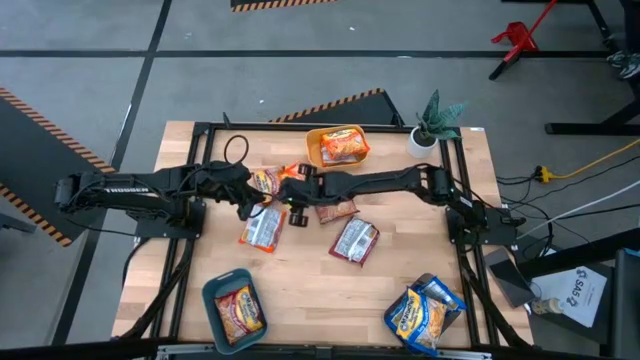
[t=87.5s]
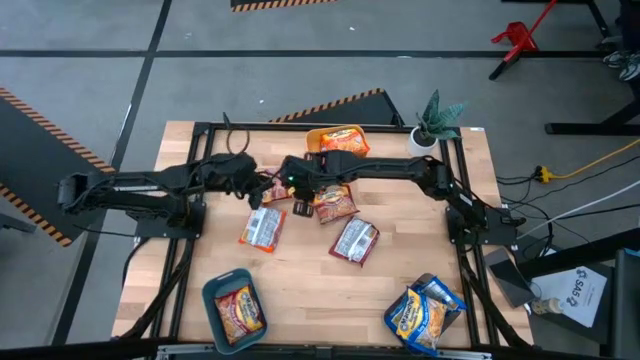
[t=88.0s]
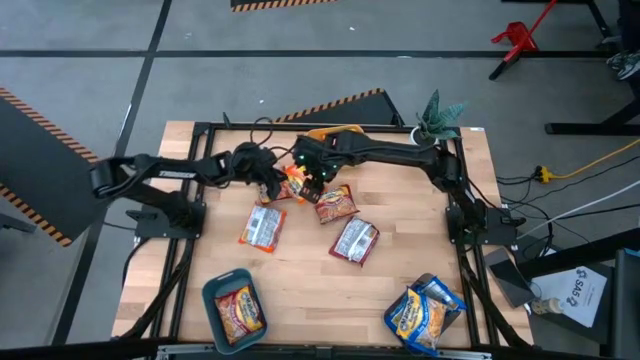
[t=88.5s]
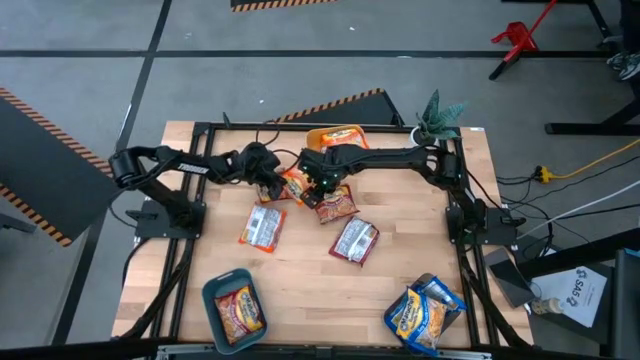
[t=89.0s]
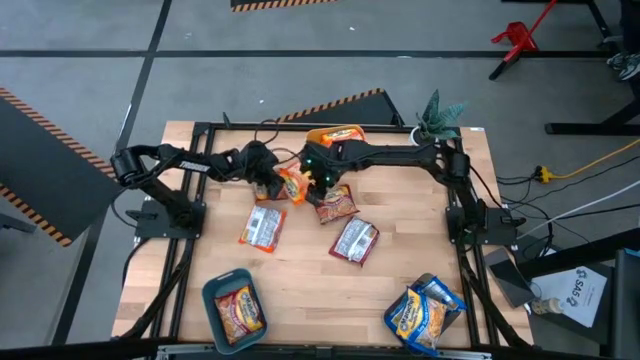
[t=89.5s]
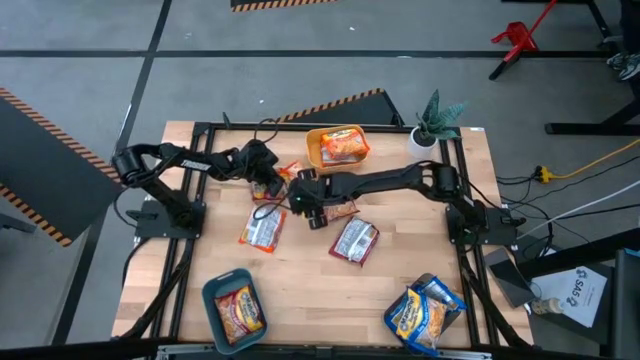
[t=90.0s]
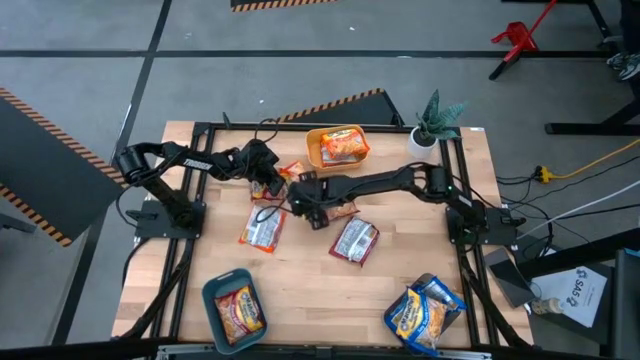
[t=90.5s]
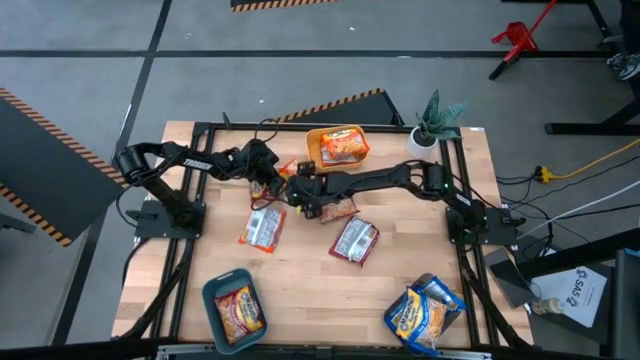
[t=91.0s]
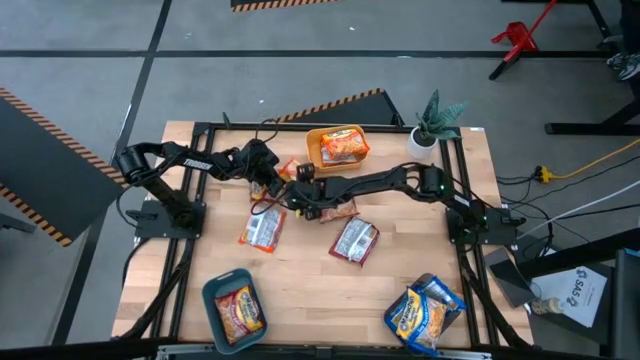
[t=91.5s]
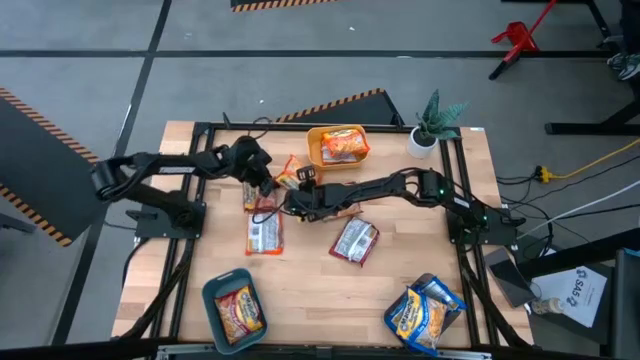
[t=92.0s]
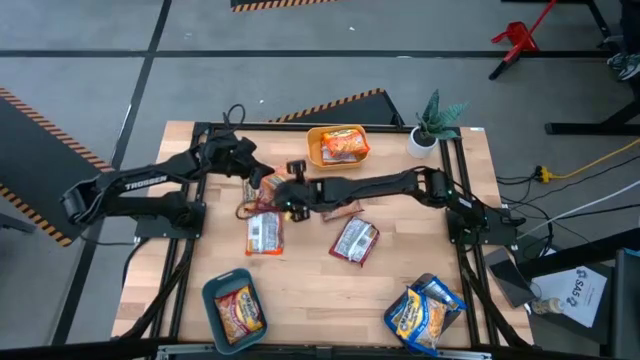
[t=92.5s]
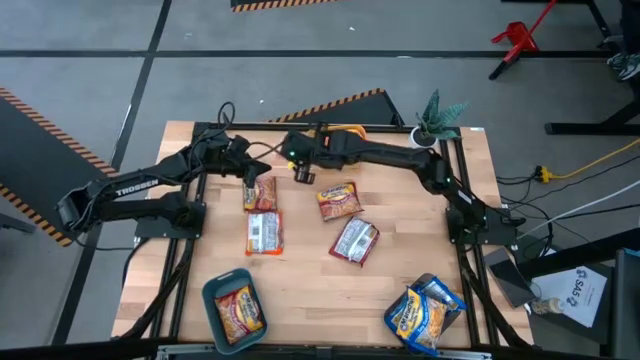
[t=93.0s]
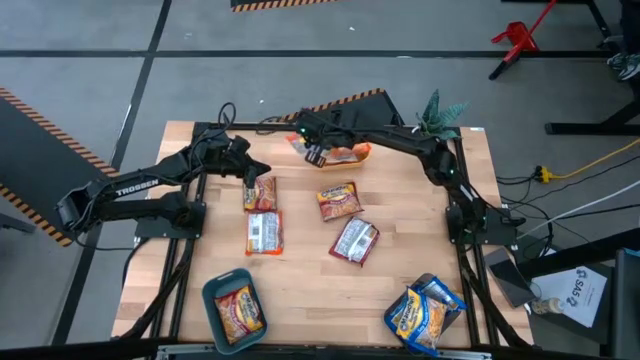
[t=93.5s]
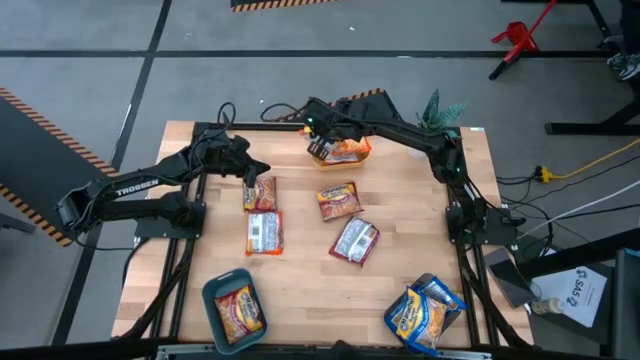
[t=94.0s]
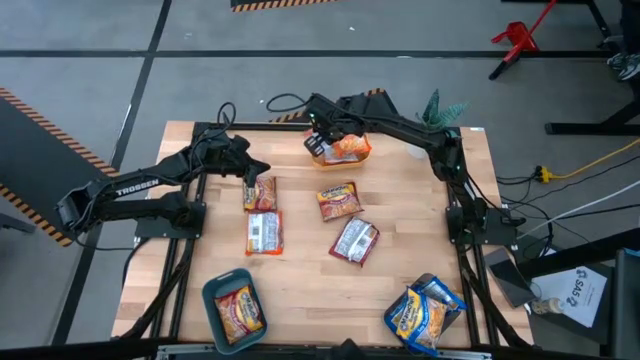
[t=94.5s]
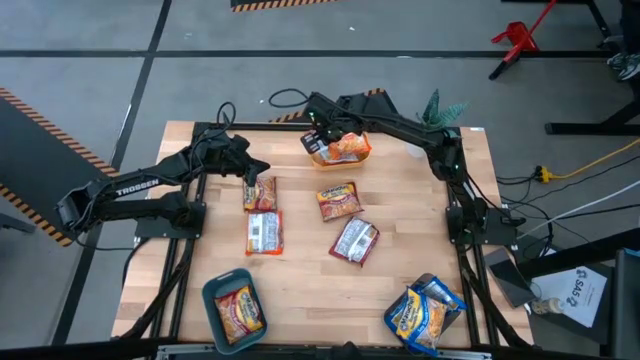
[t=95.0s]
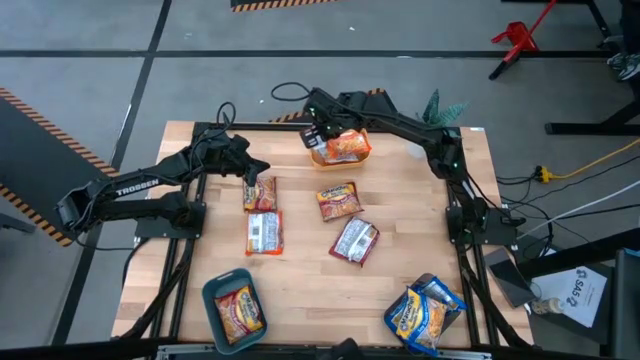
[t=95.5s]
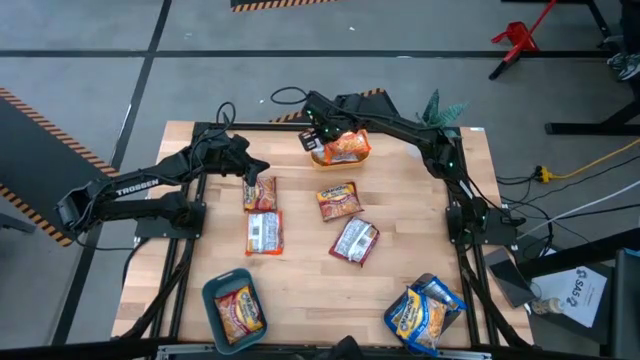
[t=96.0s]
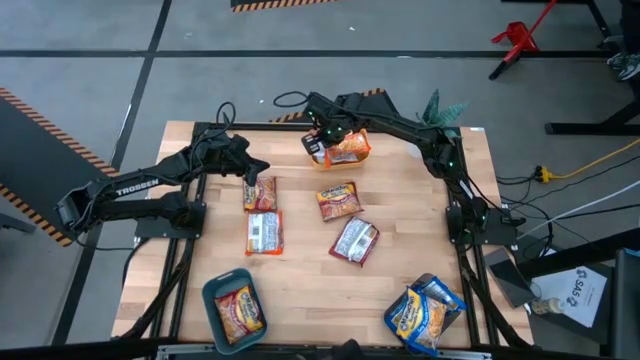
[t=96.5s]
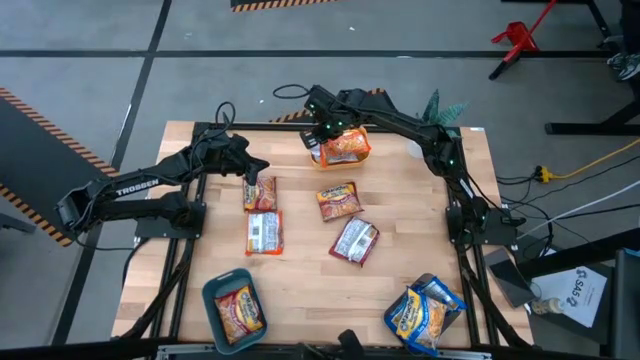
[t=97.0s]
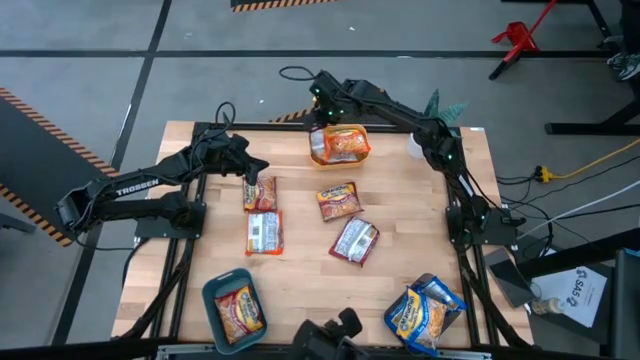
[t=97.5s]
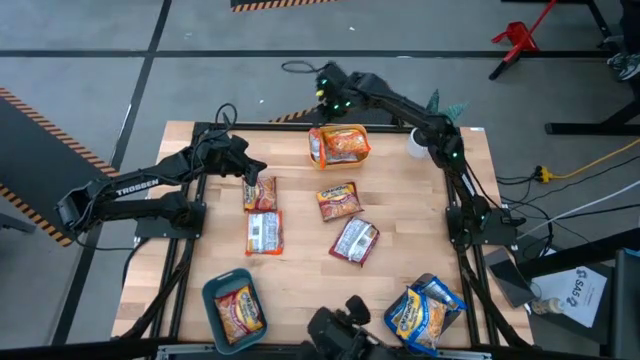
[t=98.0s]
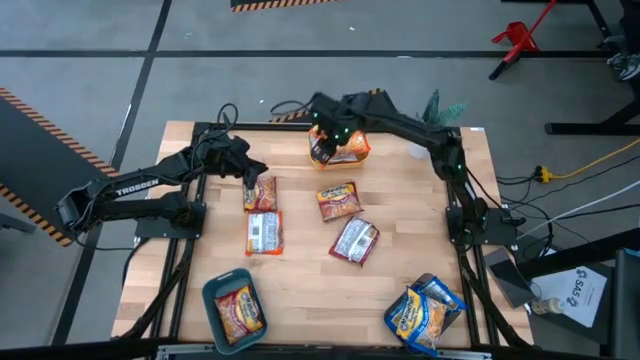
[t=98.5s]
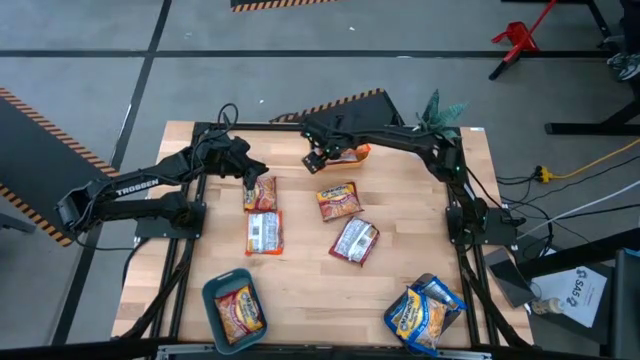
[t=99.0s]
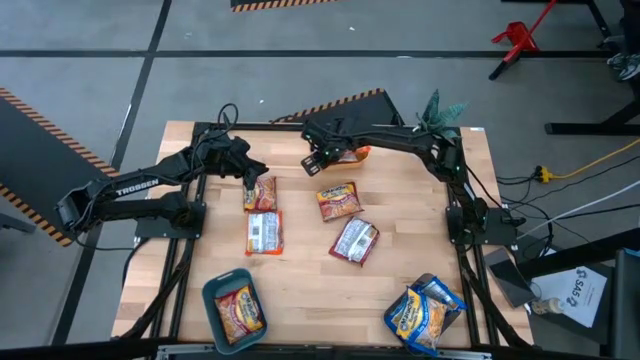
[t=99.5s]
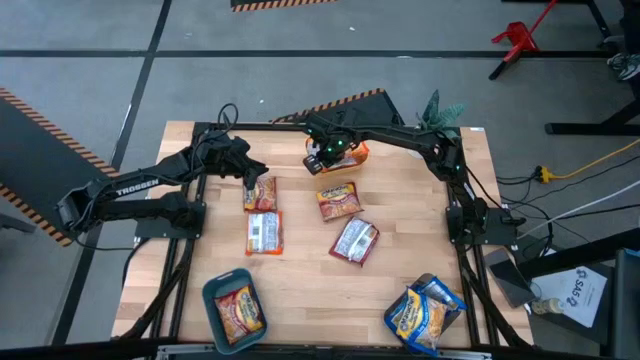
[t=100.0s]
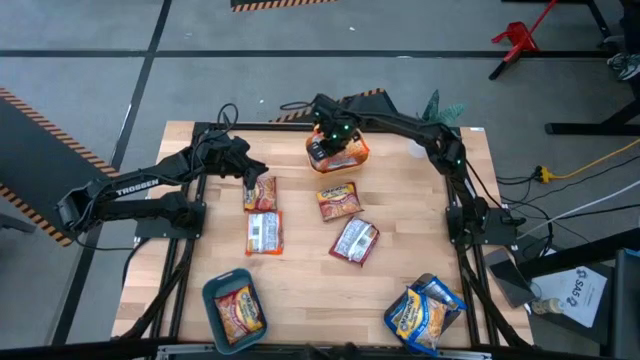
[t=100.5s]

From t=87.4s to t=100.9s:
Task: Sort Maruchan noodles
Put the orange noodle pack into the yellow bin

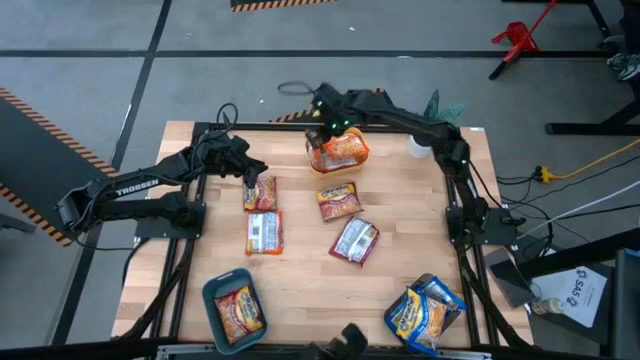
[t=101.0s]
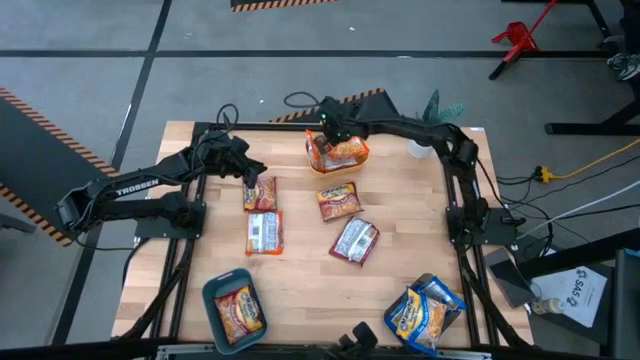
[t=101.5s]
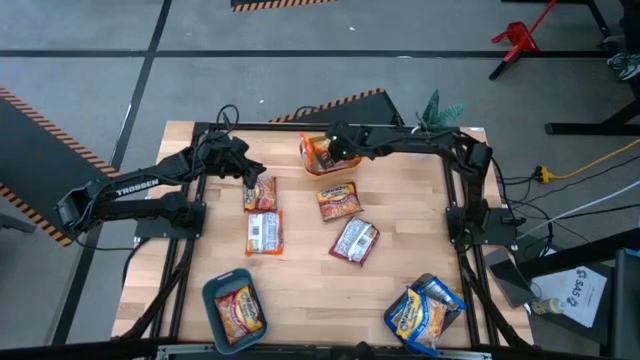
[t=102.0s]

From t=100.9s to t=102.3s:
Adjust the orange noodle pack

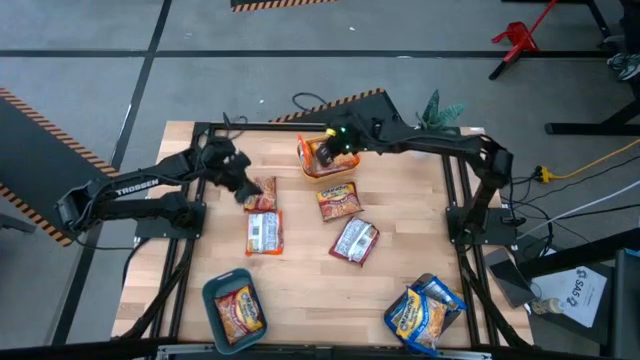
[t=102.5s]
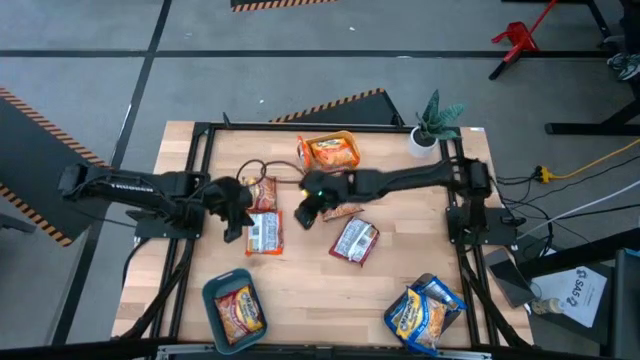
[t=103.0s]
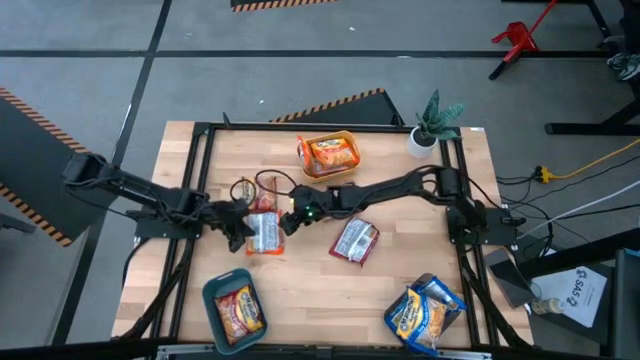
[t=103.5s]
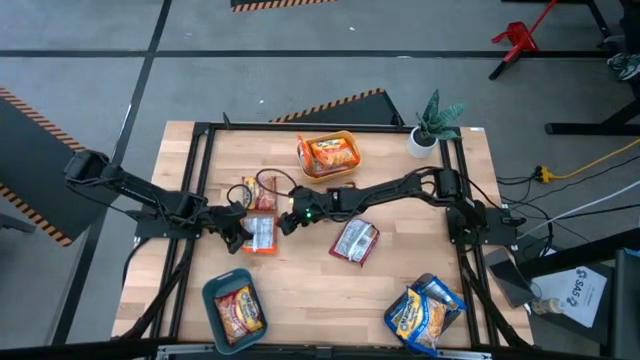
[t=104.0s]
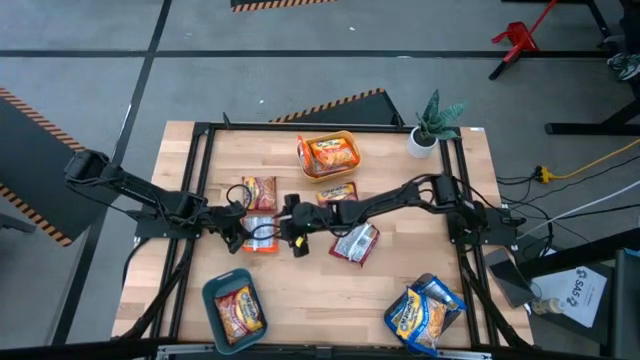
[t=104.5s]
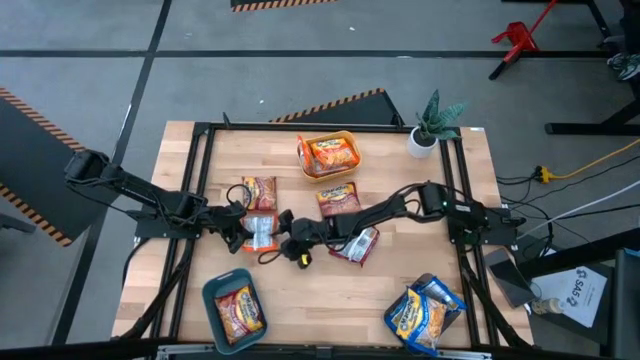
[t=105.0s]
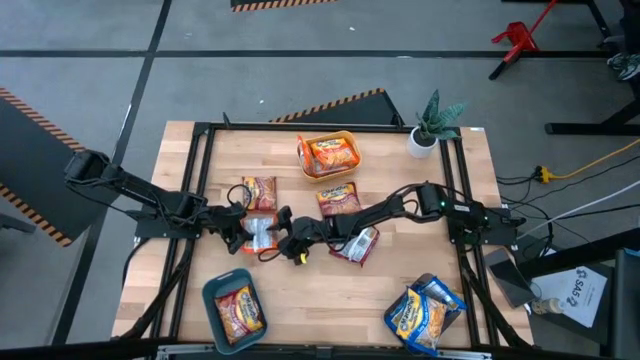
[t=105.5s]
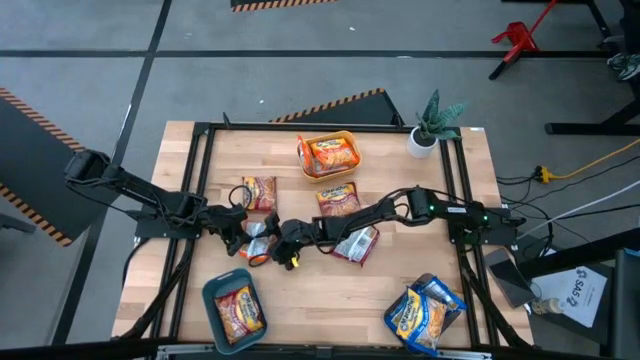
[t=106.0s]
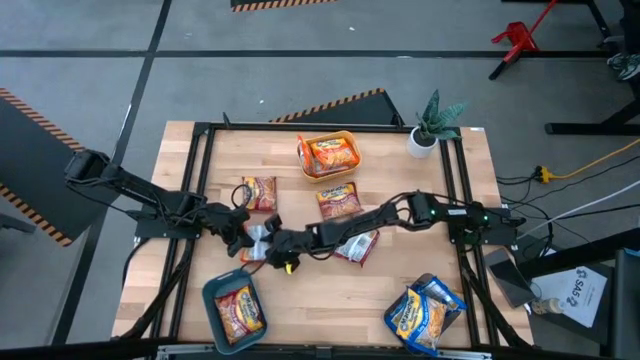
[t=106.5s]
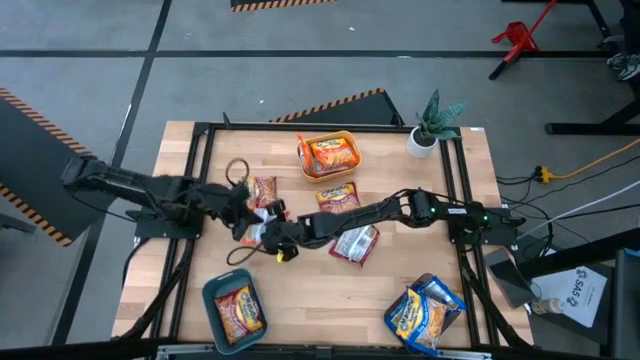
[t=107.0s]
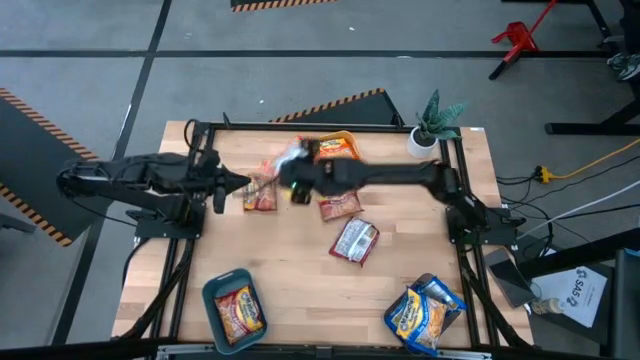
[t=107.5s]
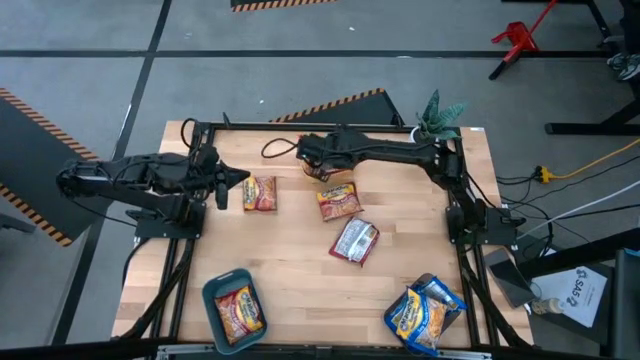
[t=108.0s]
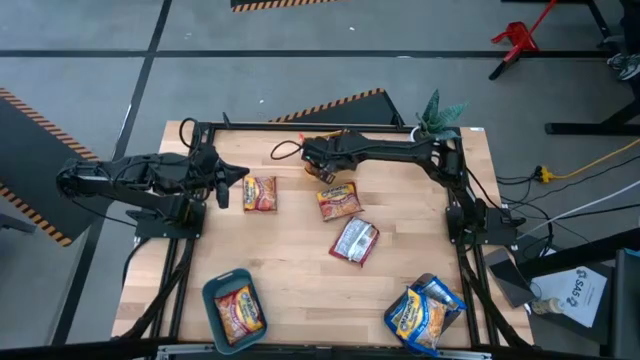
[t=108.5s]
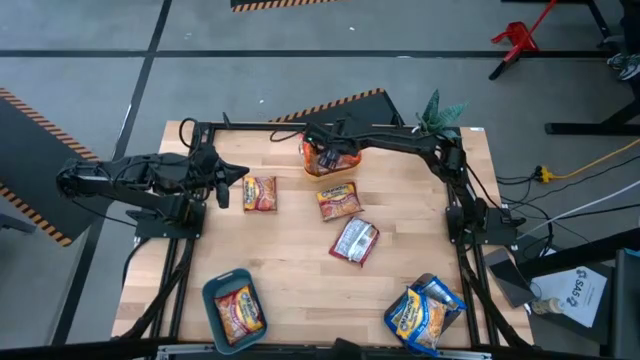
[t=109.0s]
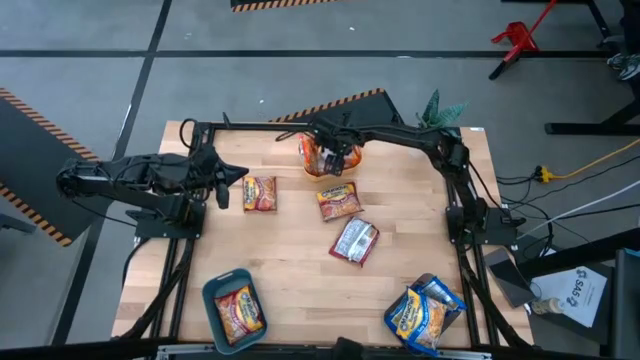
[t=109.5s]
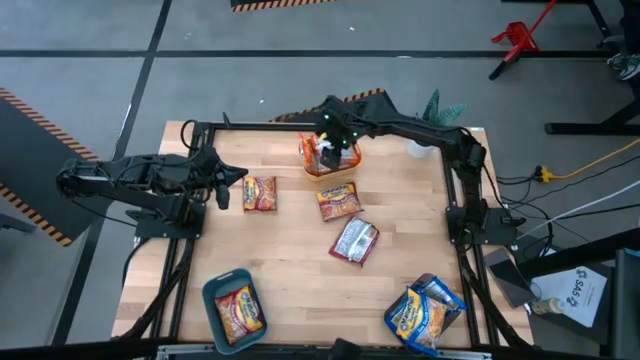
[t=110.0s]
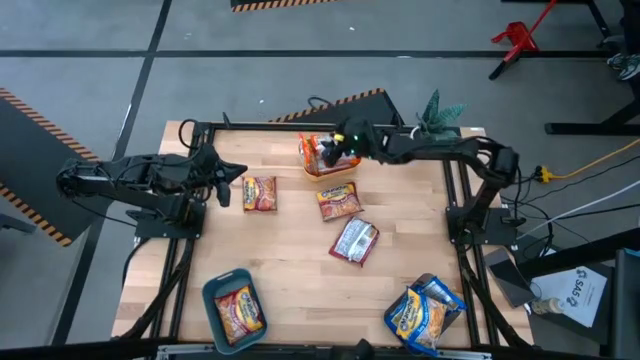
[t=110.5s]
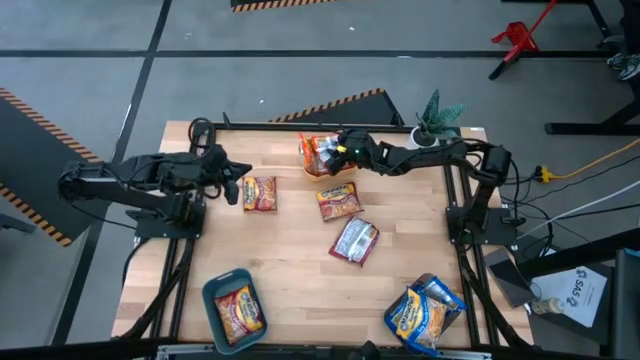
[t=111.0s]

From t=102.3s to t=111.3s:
Put the orange noodle pack into the yellow bin
